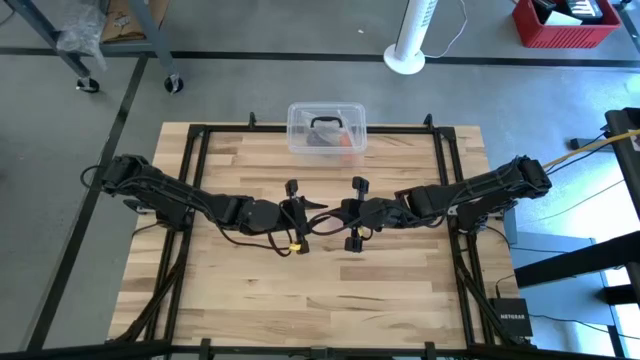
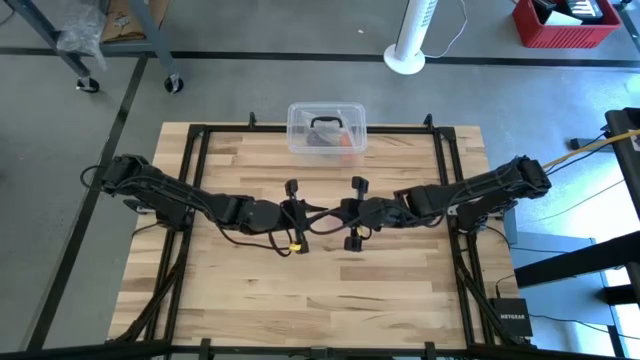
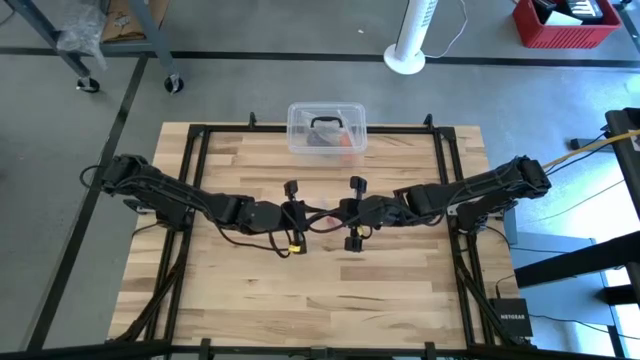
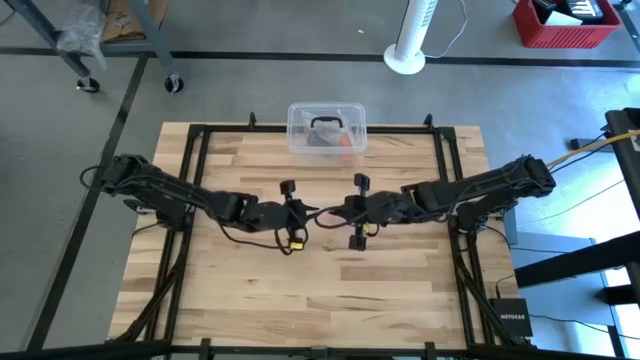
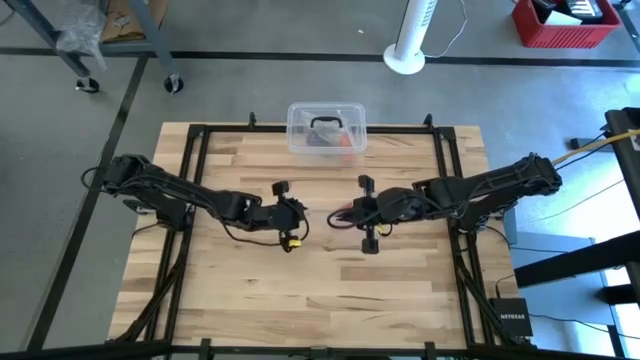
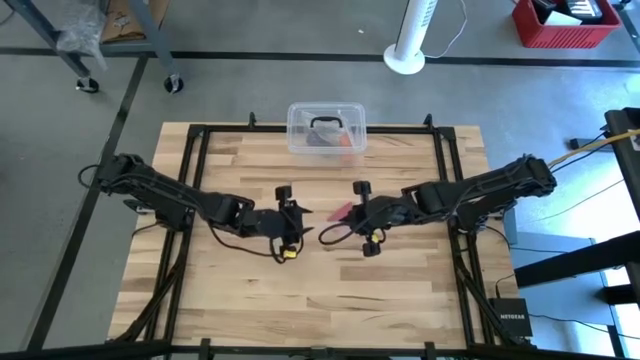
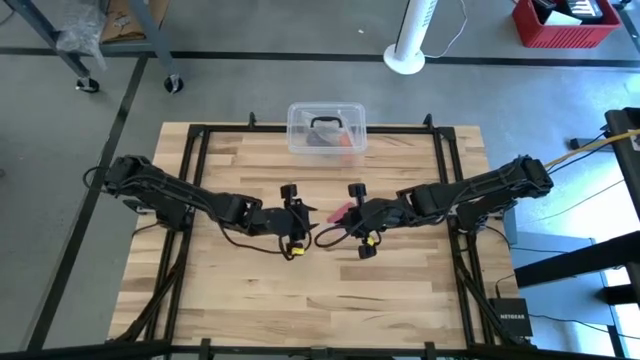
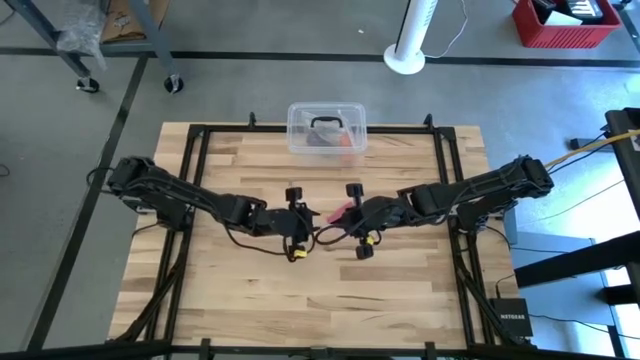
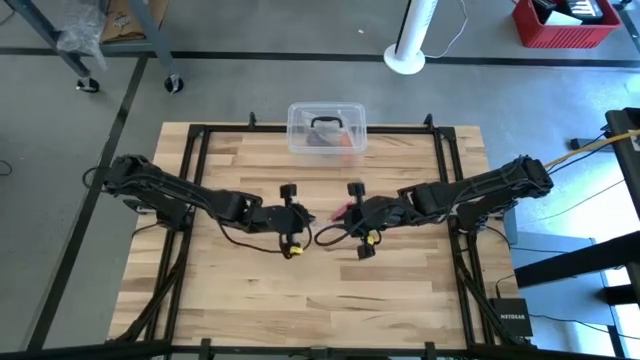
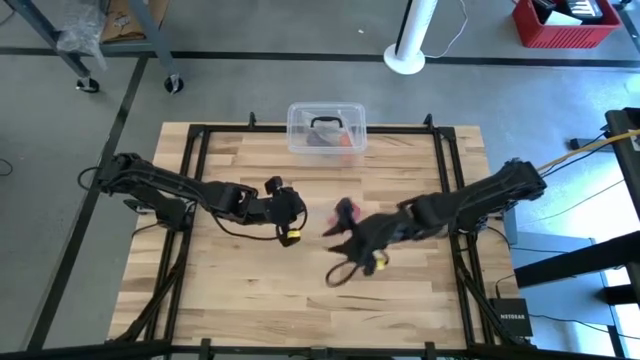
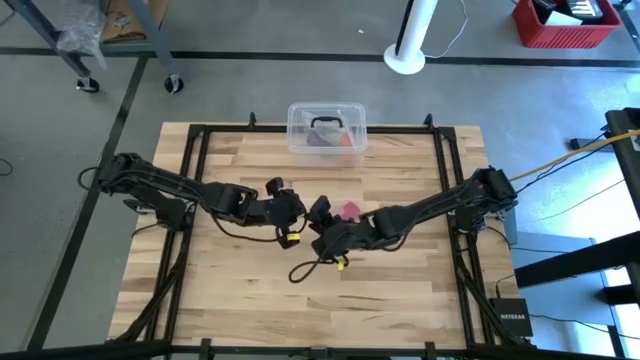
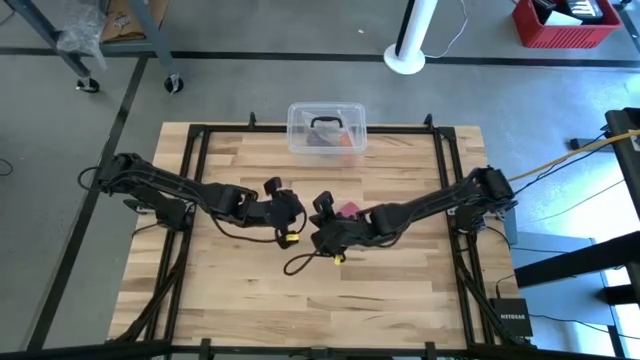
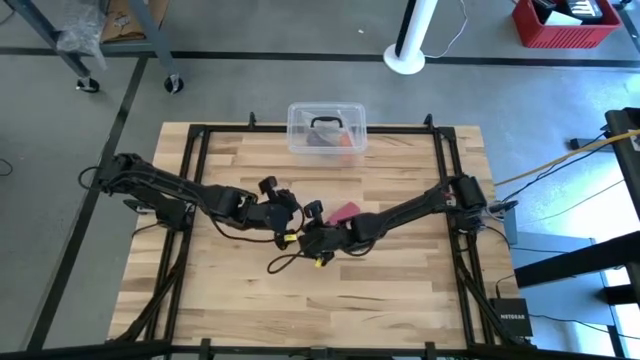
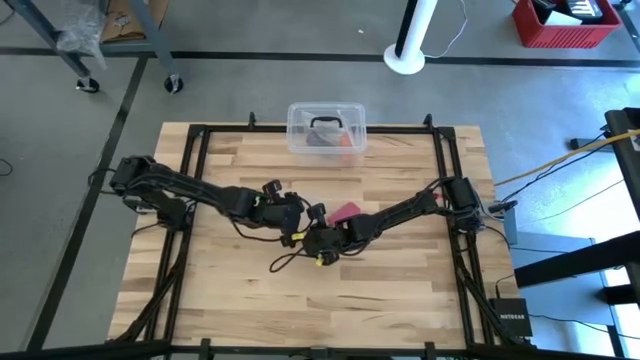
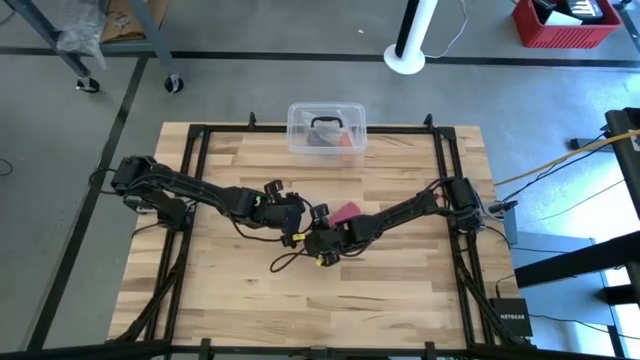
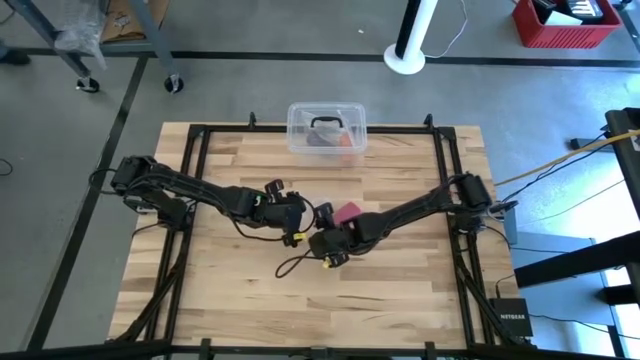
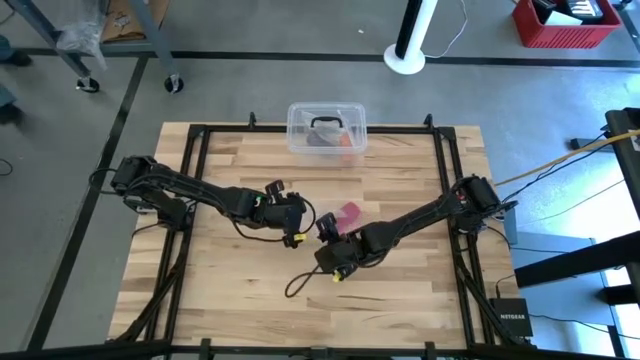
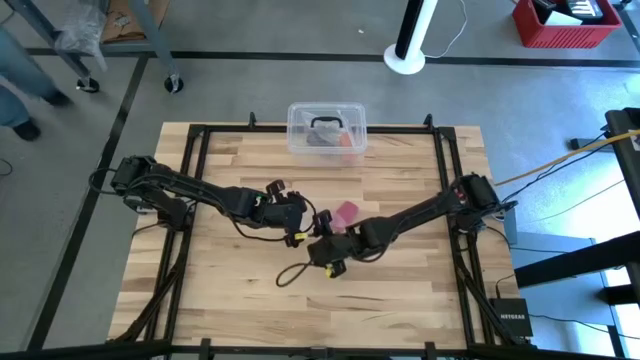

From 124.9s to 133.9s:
Task: Roll bandage
Open the transparent zip lock bag

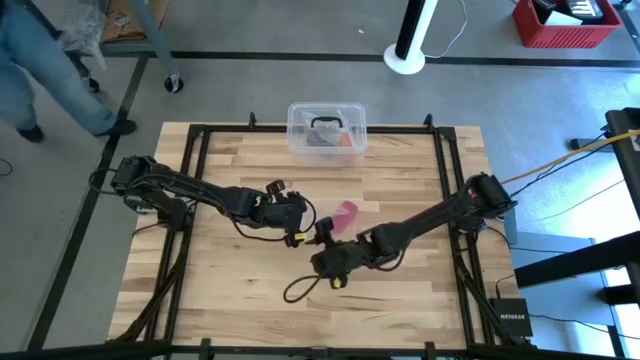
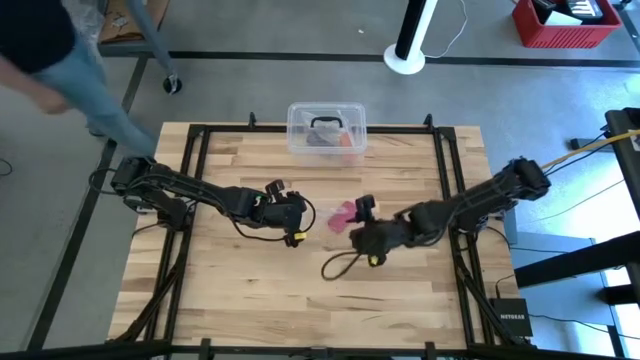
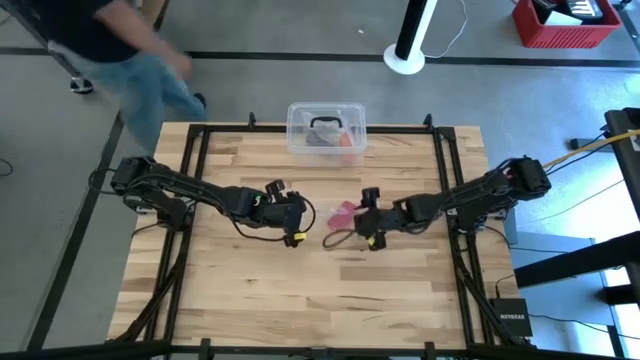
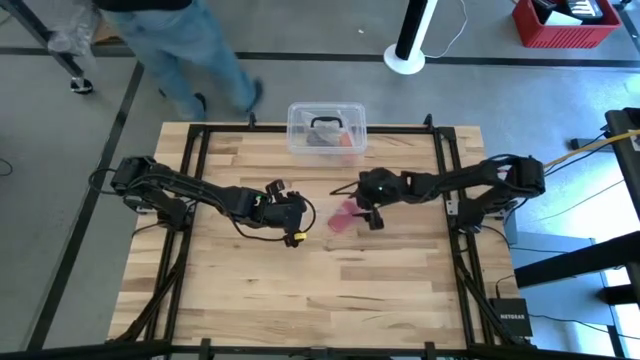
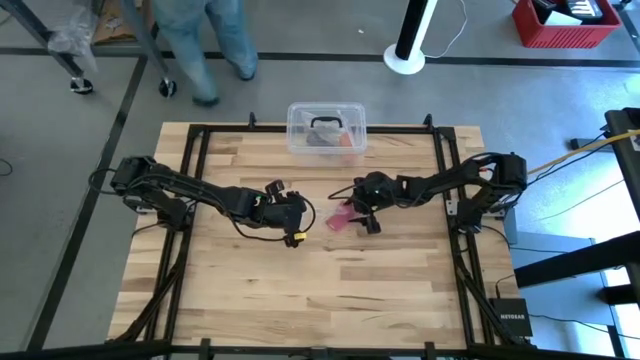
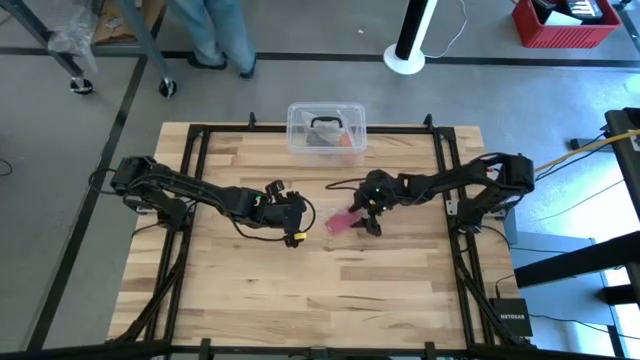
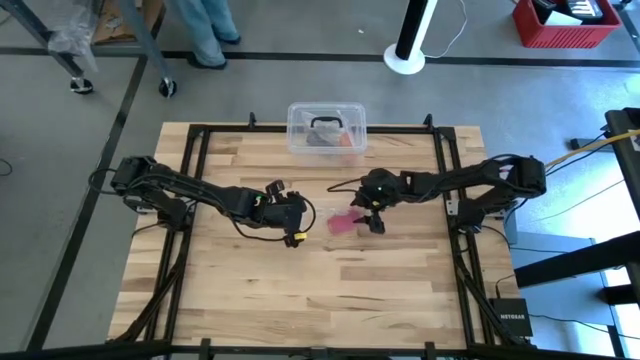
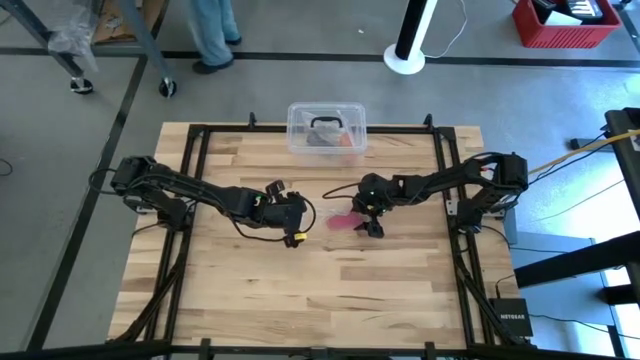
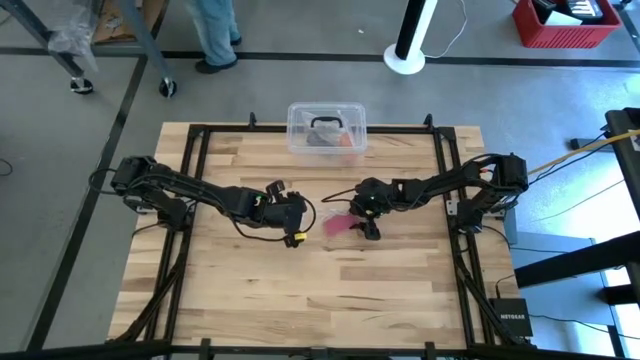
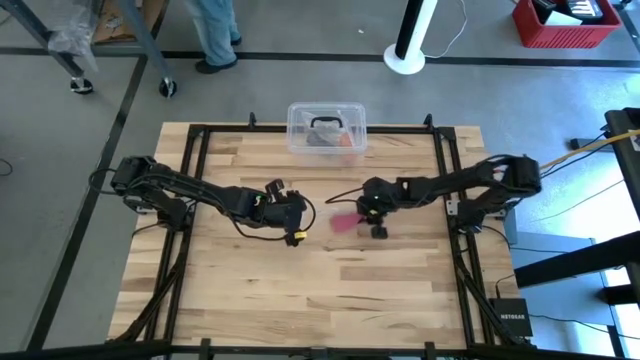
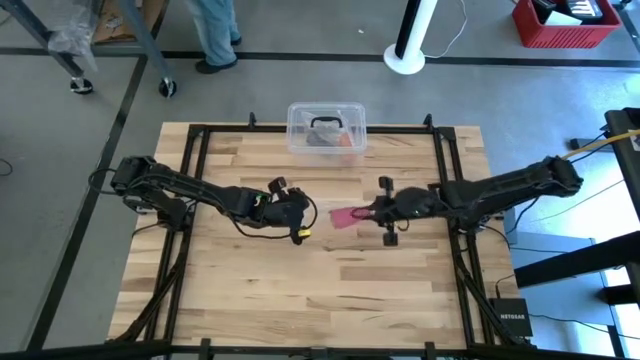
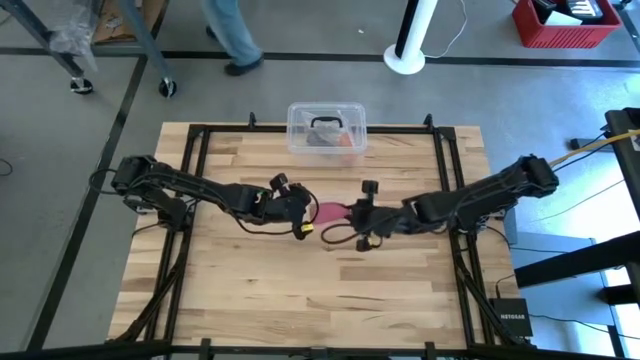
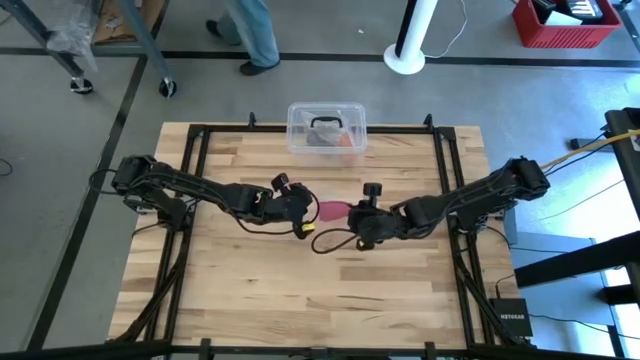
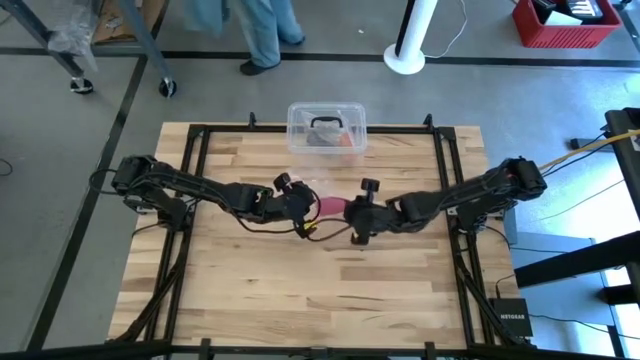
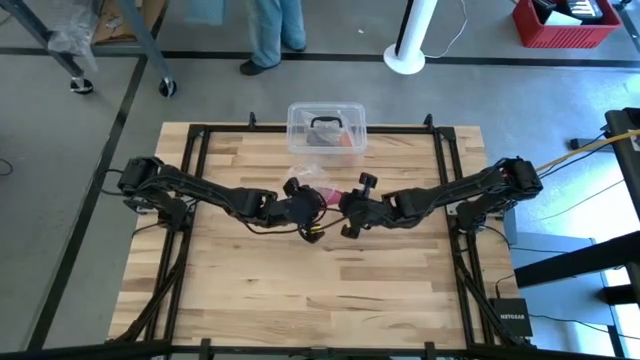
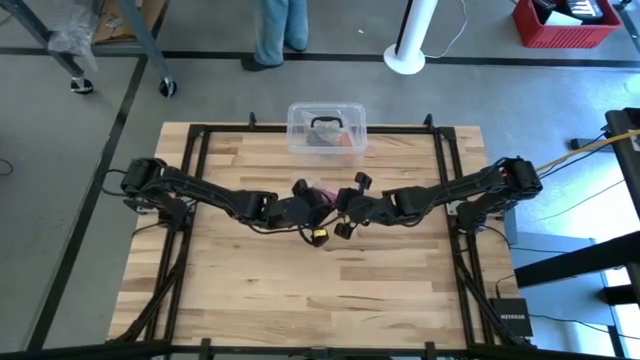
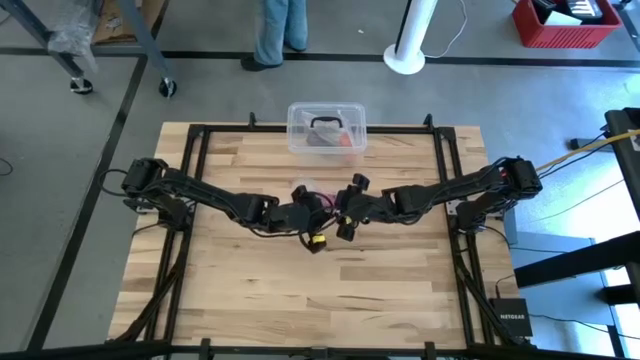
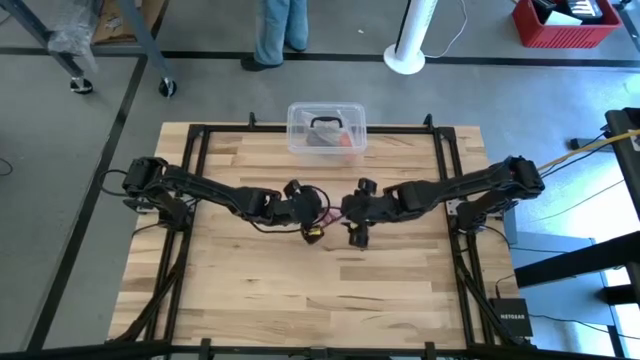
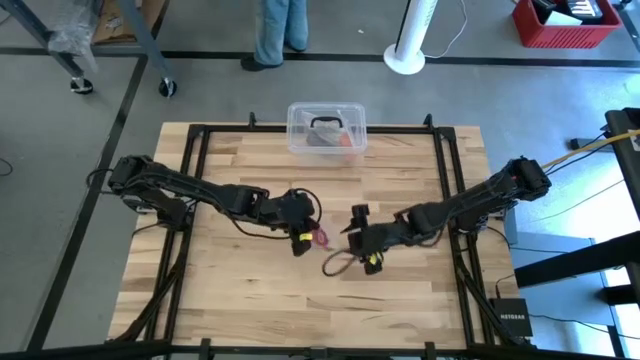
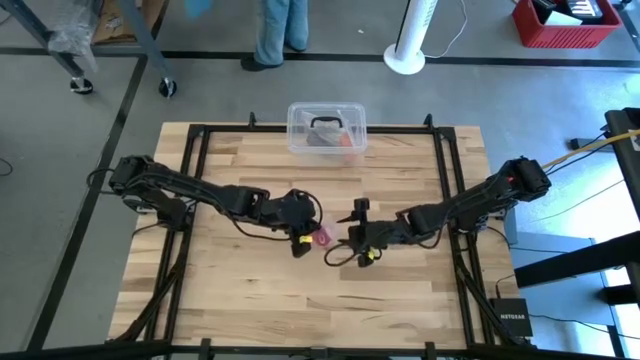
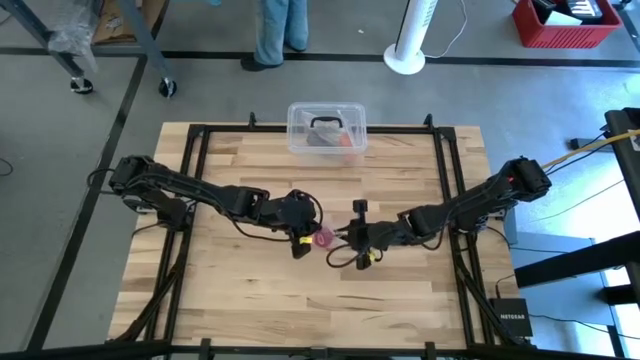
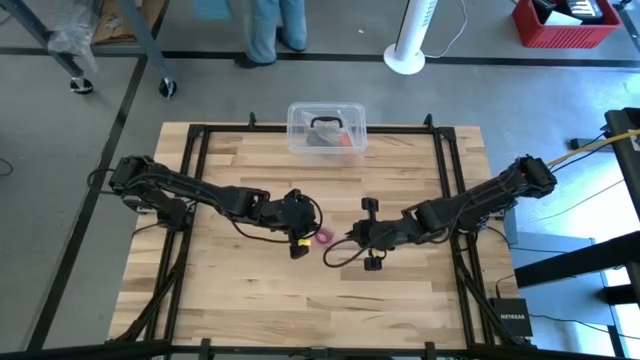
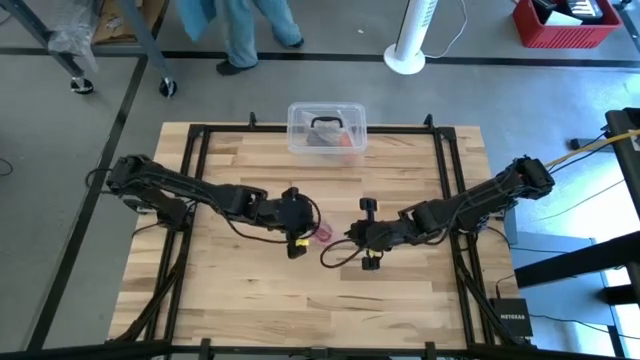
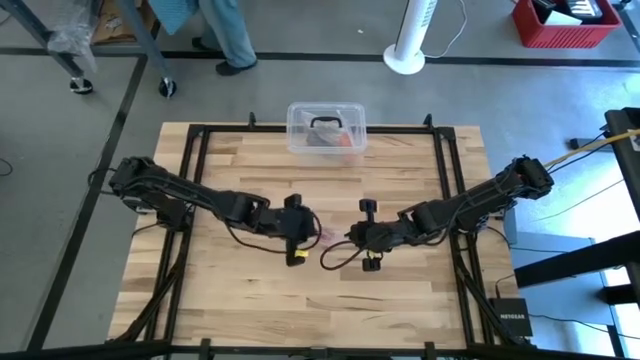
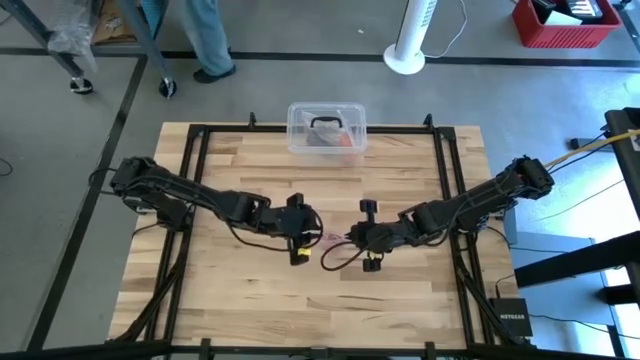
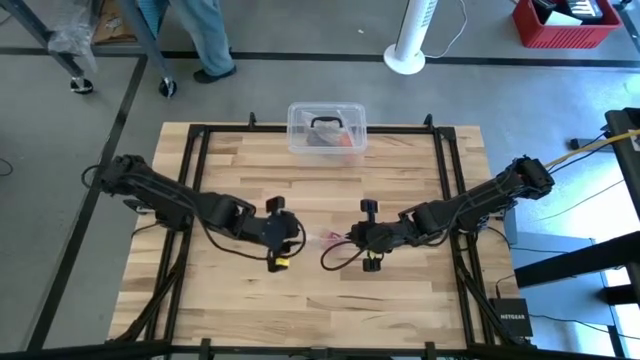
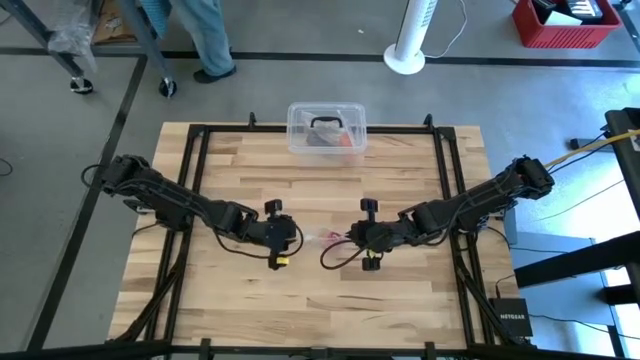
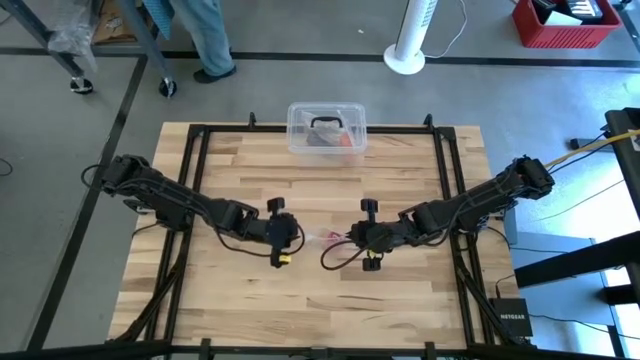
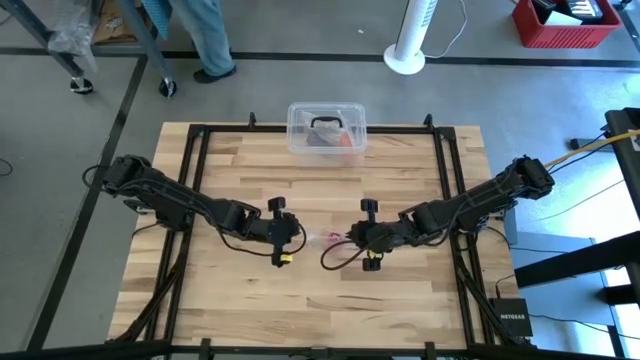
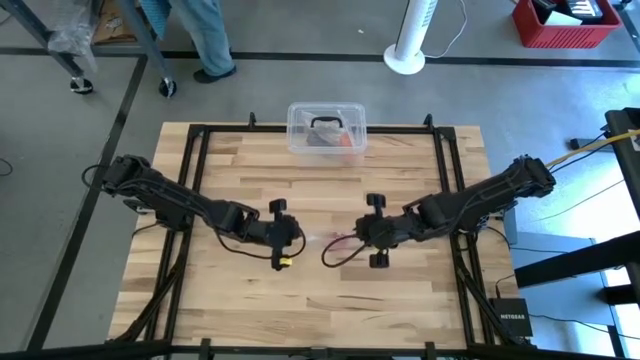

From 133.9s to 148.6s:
Put the pink bandage into the transparent zip lock bag
